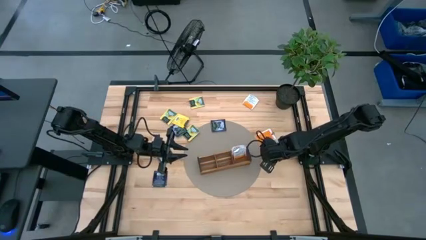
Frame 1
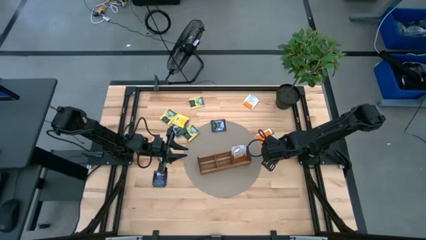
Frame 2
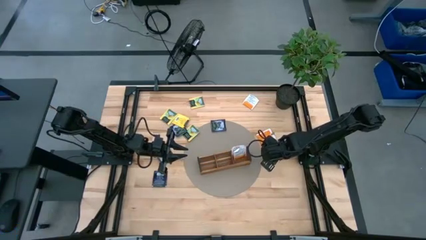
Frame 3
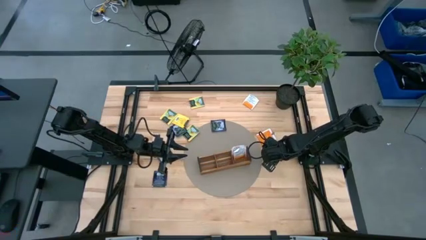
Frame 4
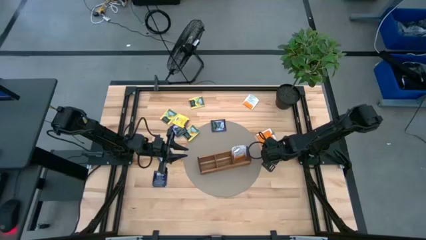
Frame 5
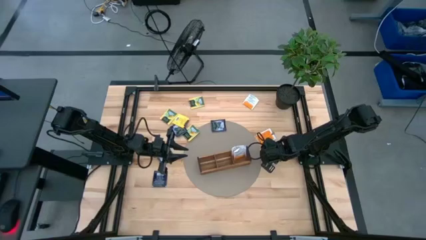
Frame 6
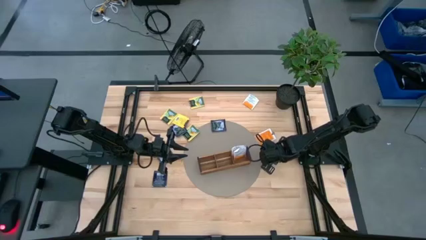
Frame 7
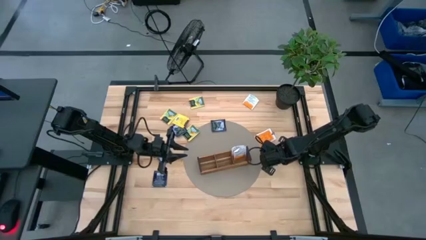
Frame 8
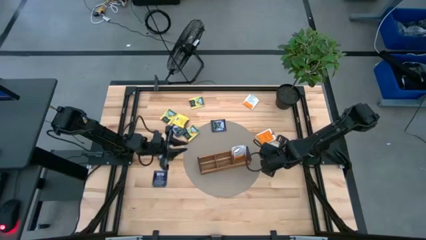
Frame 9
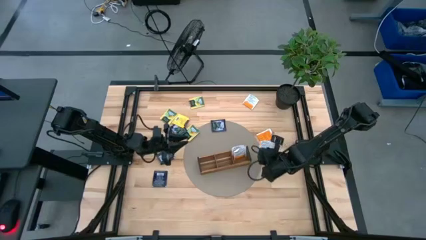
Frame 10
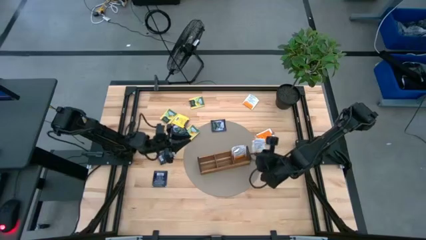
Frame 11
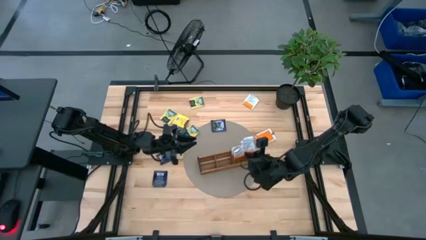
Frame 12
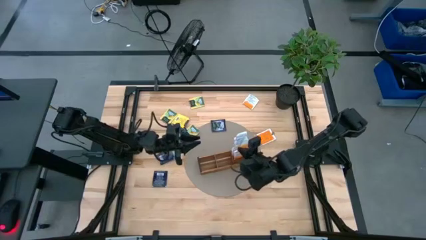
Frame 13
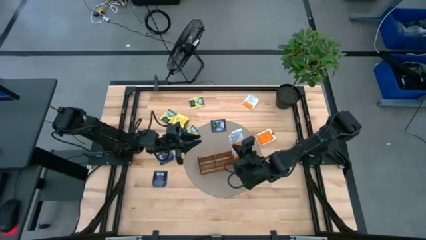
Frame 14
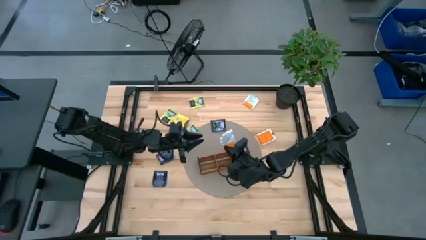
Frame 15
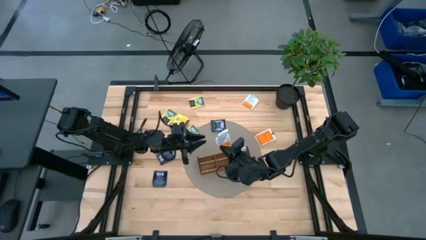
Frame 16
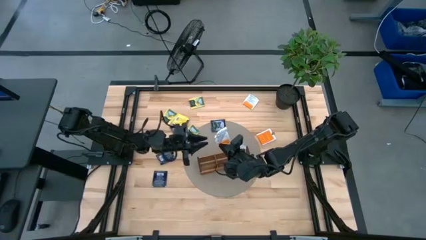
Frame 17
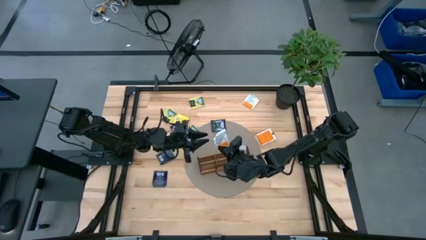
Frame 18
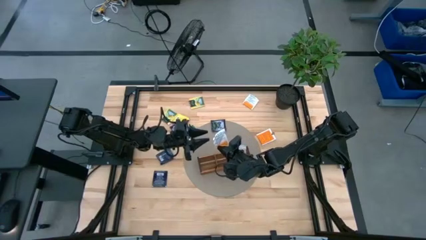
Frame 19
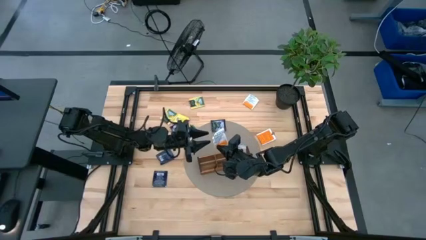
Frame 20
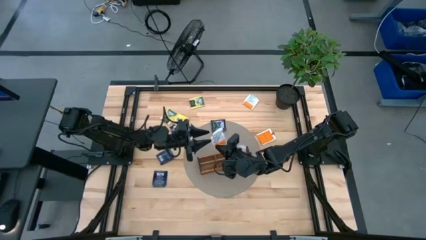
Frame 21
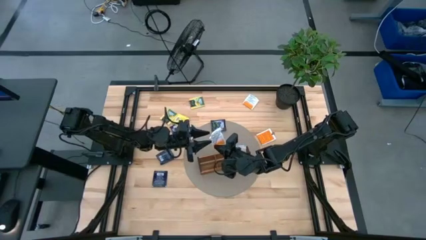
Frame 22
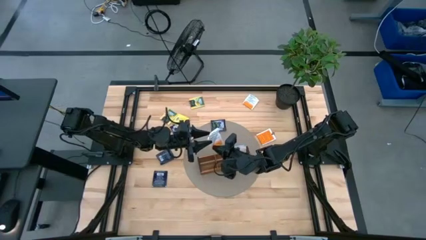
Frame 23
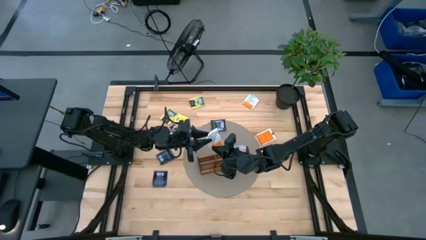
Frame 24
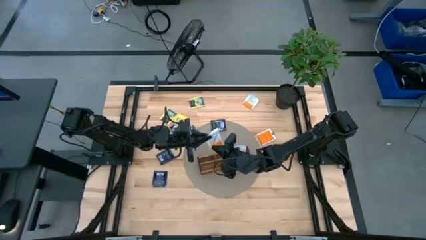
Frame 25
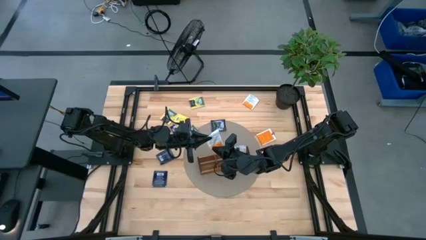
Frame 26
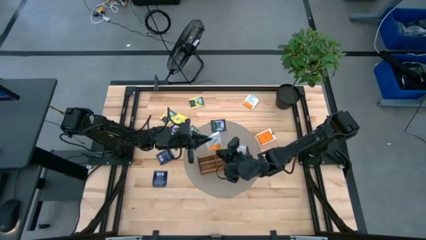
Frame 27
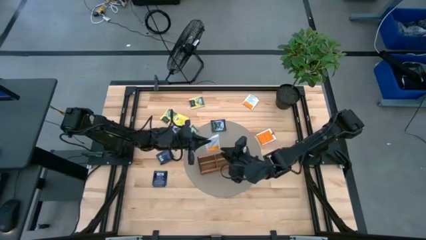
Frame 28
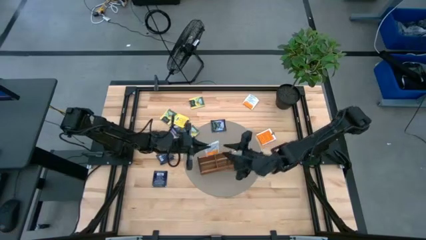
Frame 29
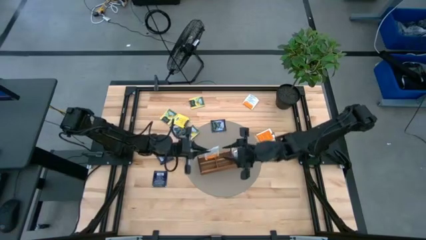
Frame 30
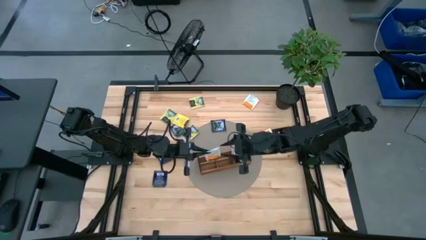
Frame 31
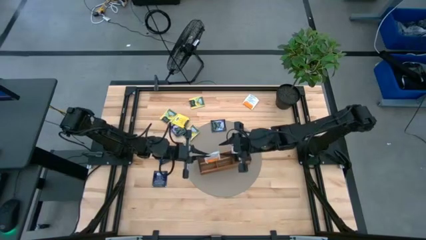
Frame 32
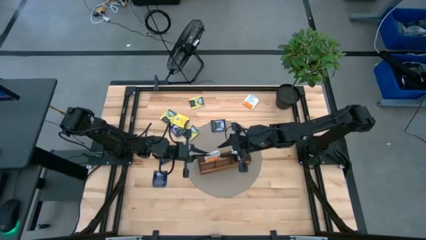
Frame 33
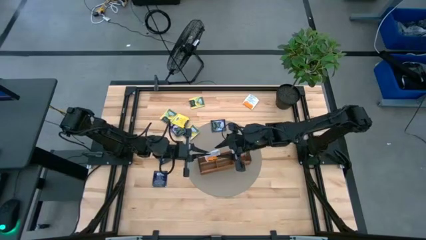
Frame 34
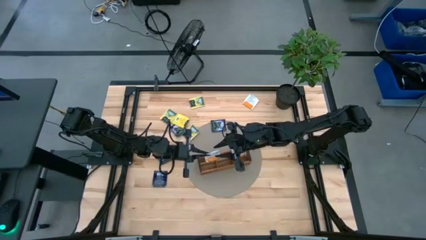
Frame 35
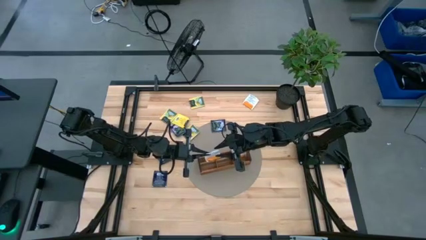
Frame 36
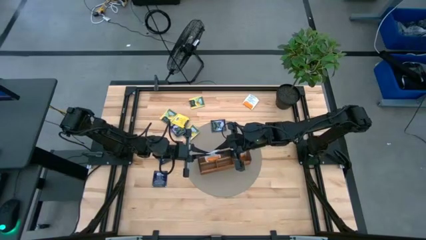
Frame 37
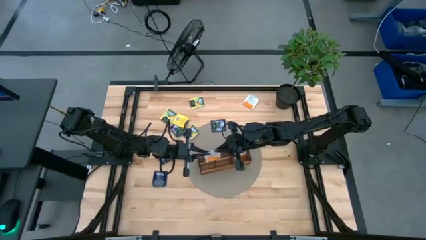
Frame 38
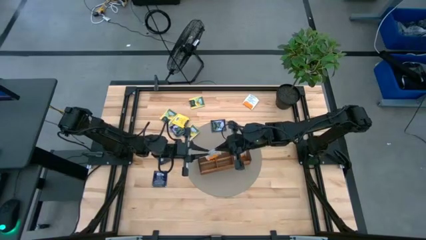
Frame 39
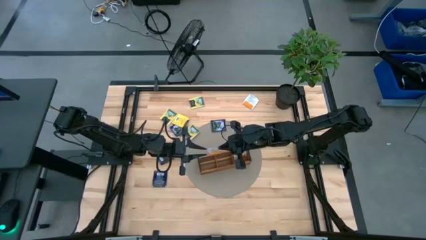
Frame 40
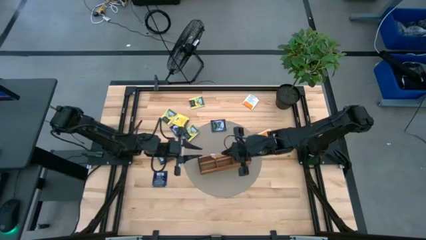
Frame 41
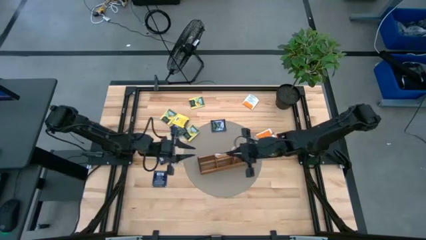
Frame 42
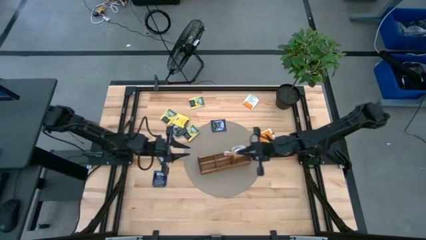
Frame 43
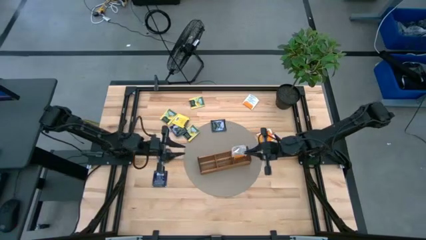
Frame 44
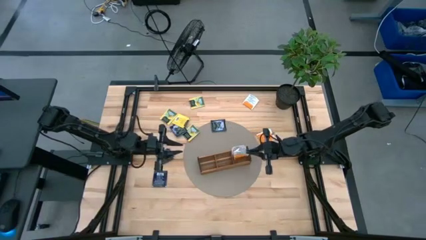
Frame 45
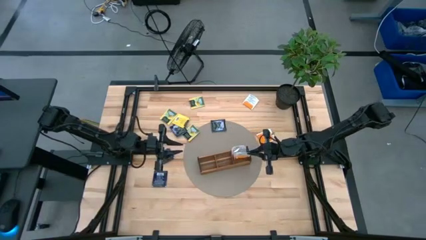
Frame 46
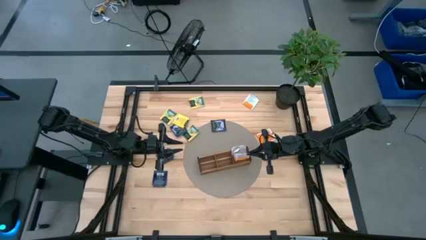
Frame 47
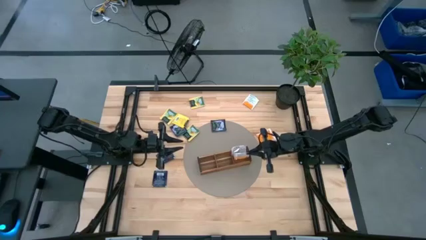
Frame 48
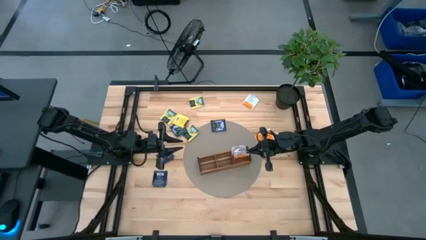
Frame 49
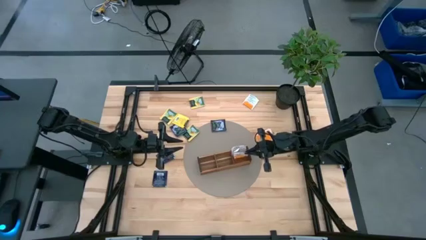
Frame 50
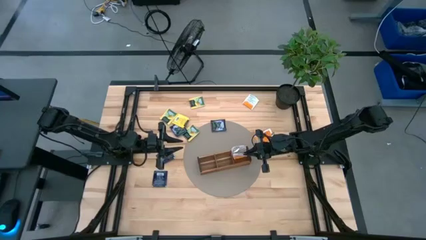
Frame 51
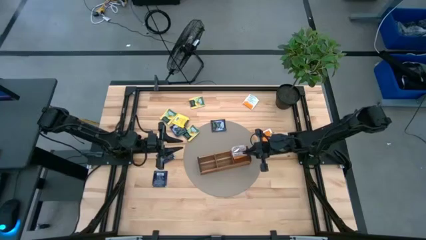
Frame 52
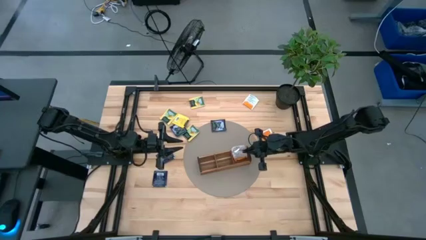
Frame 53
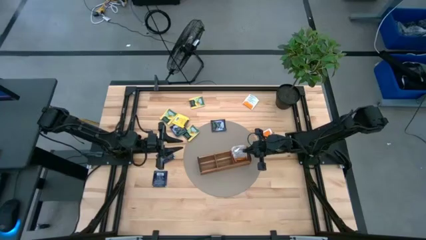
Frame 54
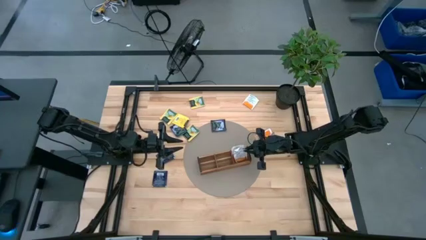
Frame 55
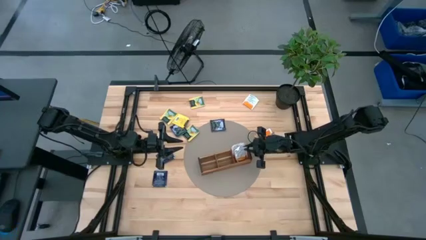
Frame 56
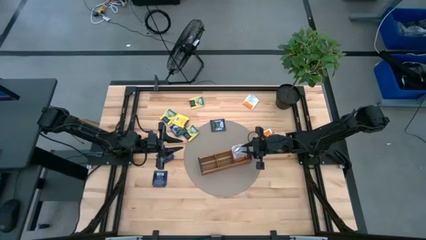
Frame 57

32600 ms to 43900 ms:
Task: Pick & Place Tea
Put the orange tea bag into the right section of the wooden organizer

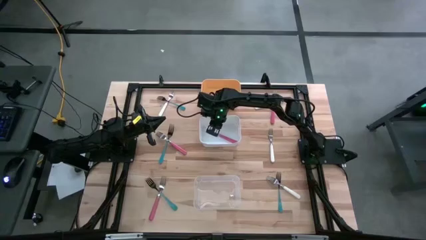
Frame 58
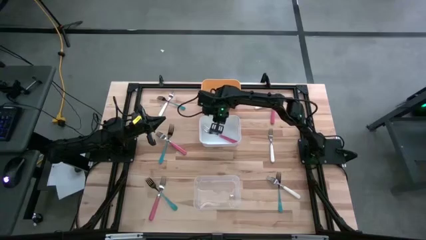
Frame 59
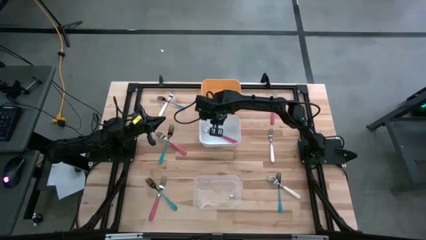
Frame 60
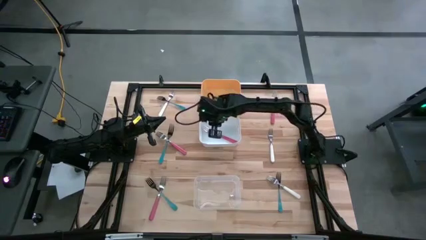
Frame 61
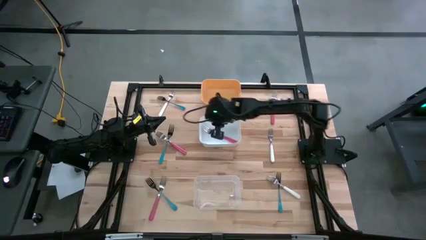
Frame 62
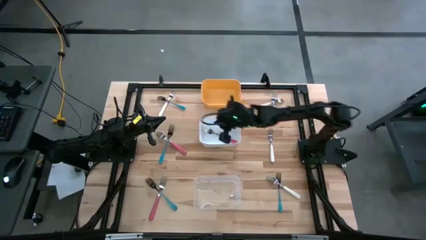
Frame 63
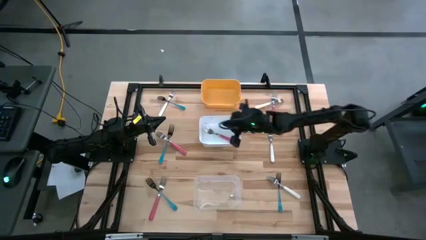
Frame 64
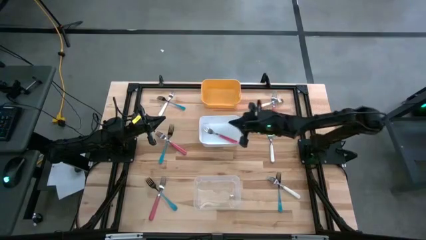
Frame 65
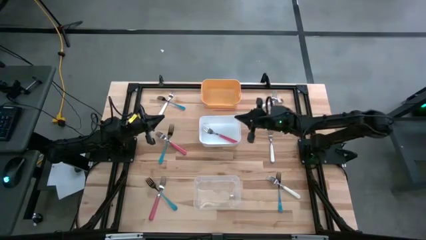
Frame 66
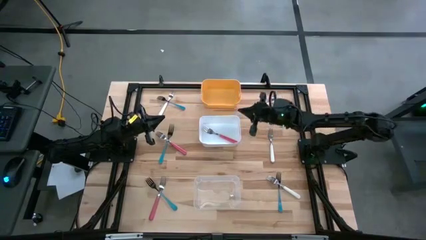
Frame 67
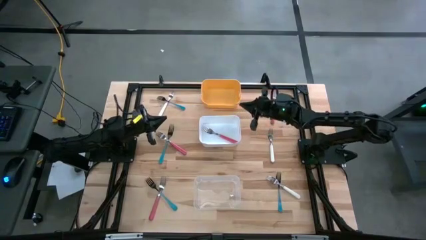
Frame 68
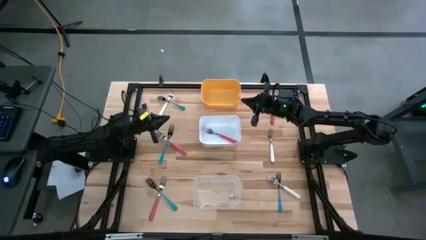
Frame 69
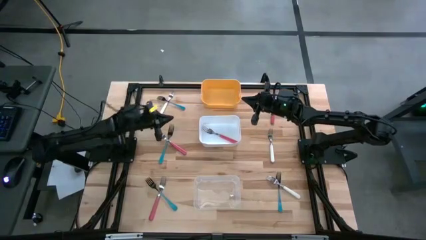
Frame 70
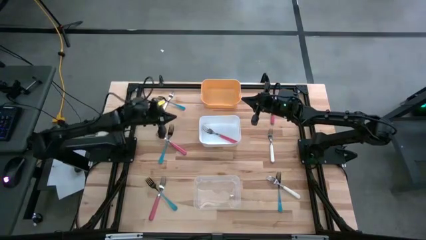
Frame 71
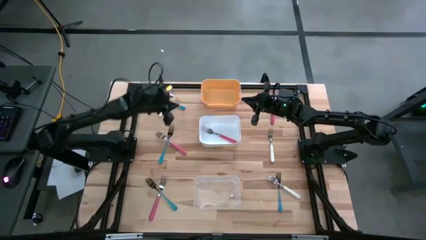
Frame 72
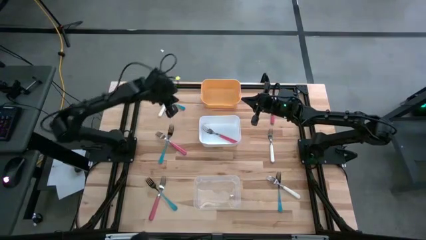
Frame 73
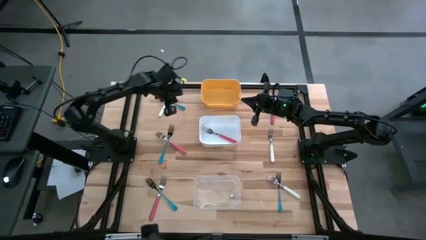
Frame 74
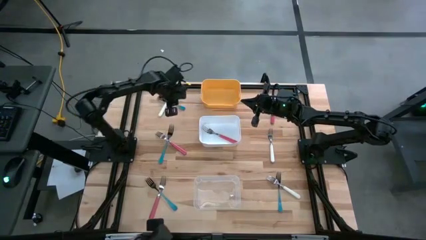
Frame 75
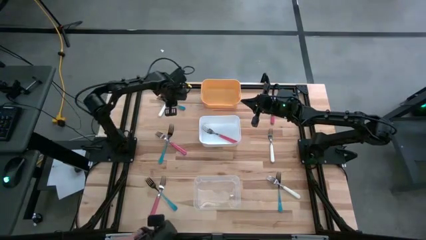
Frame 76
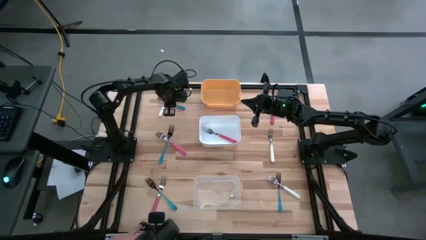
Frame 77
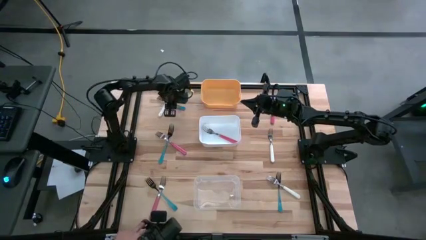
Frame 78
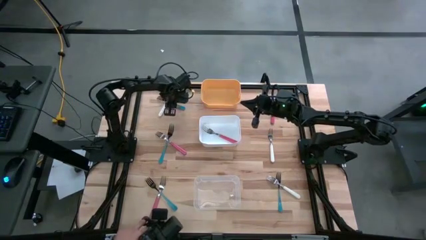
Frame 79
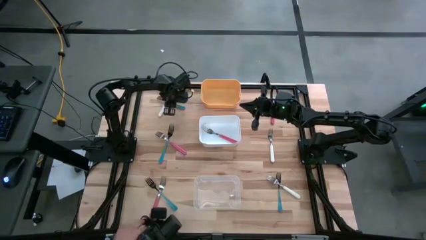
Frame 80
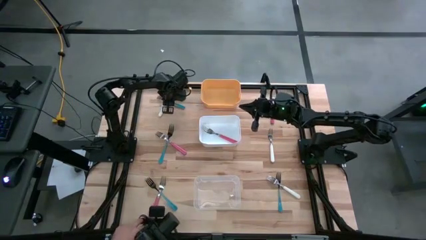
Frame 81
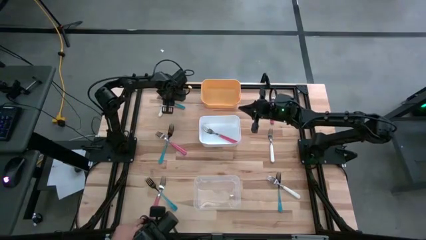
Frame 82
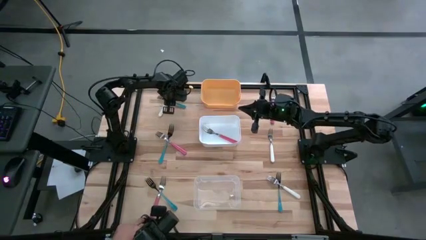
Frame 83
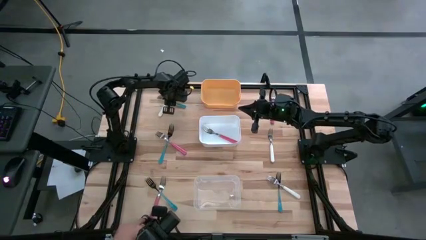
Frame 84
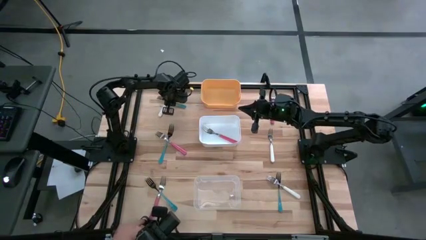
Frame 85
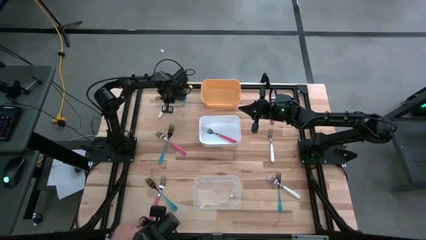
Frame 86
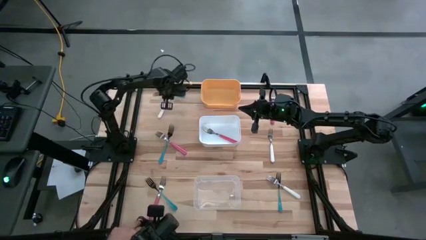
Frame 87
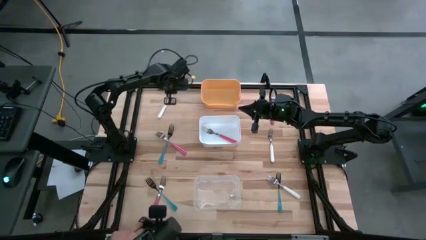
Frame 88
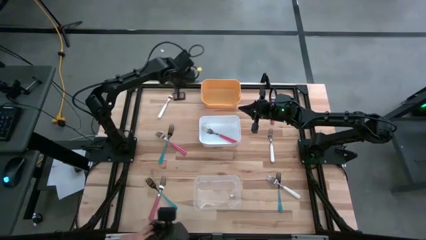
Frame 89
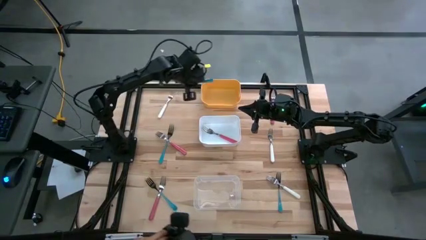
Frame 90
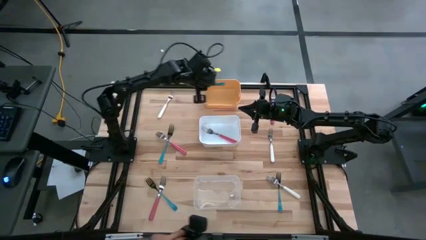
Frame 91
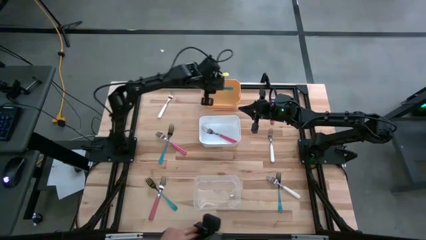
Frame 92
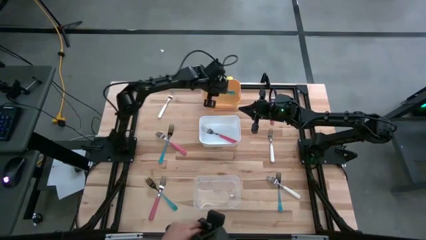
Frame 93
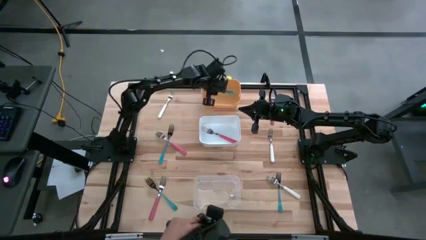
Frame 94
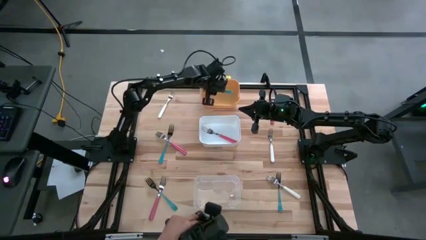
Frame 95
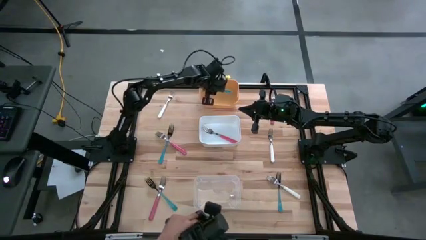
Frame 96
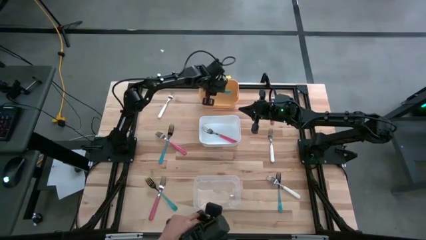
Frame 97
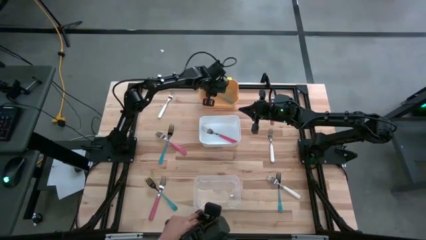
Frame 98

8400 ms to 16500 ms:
Task: Sort silverware by color (type)
Put the top left blue fork into the yellow bin
